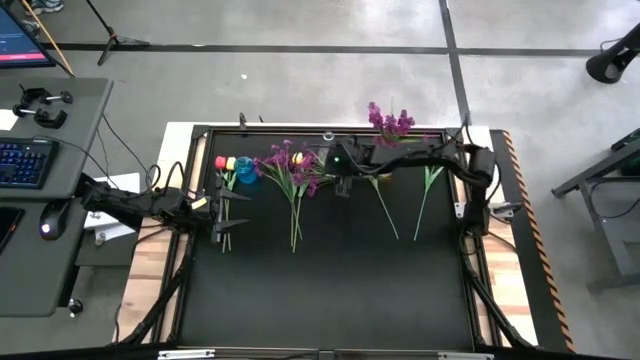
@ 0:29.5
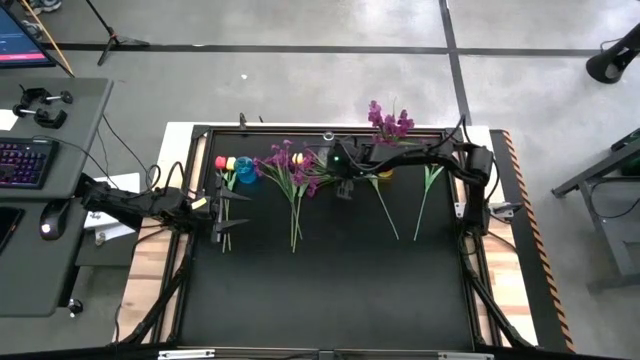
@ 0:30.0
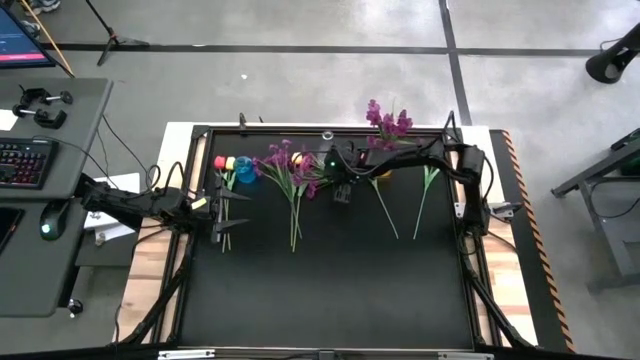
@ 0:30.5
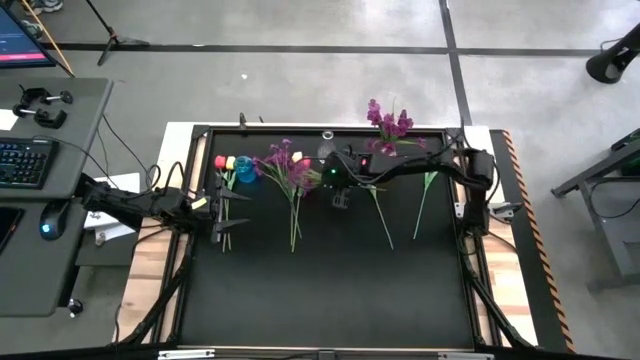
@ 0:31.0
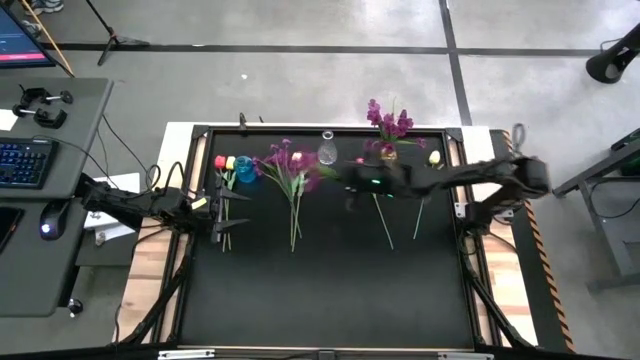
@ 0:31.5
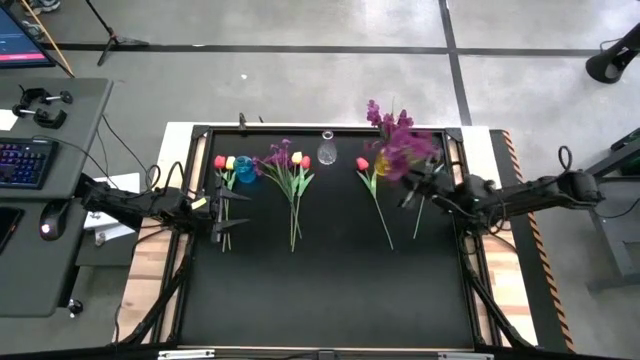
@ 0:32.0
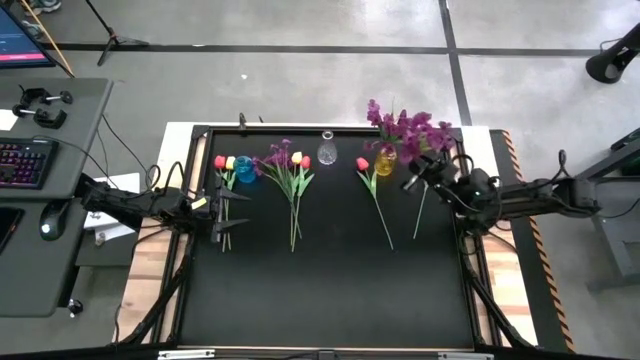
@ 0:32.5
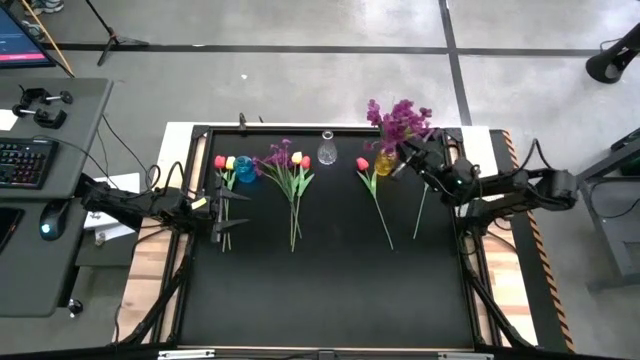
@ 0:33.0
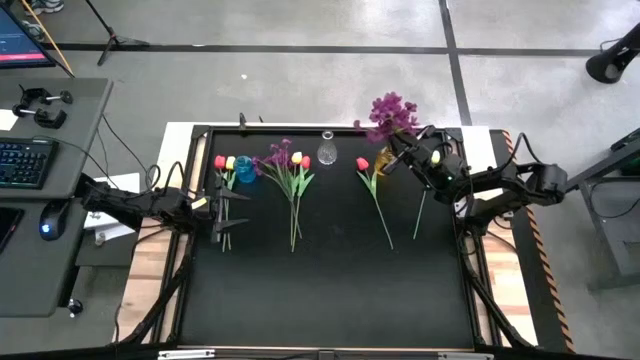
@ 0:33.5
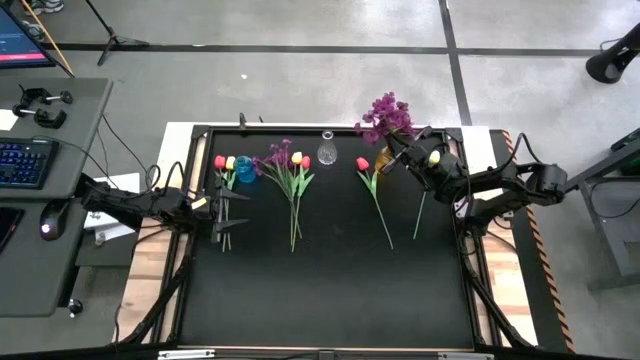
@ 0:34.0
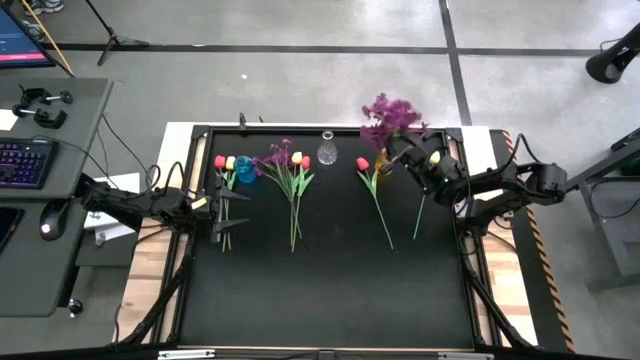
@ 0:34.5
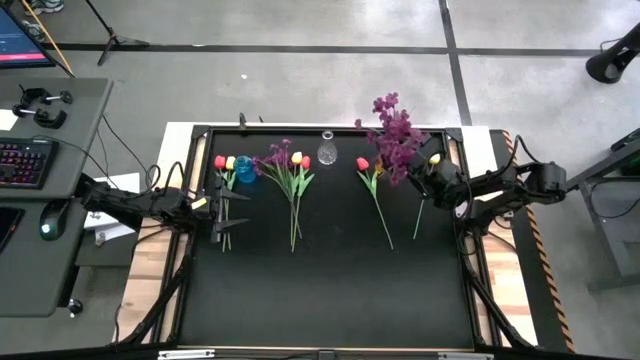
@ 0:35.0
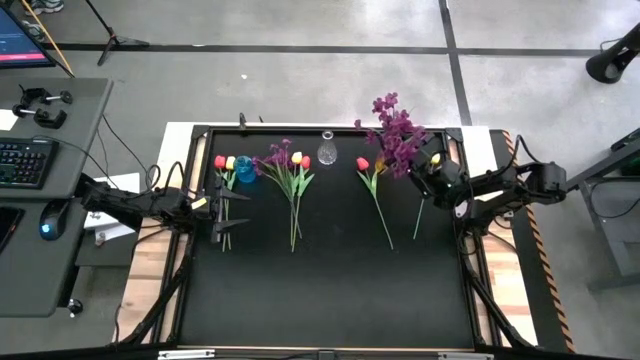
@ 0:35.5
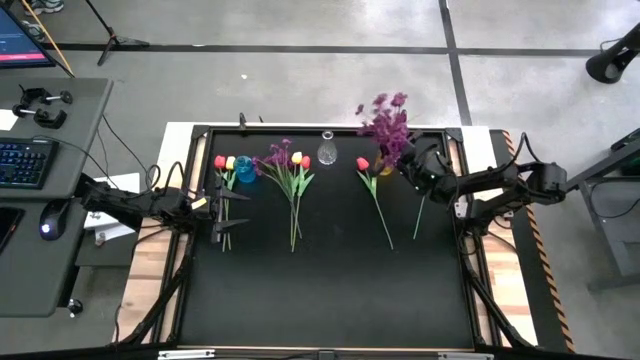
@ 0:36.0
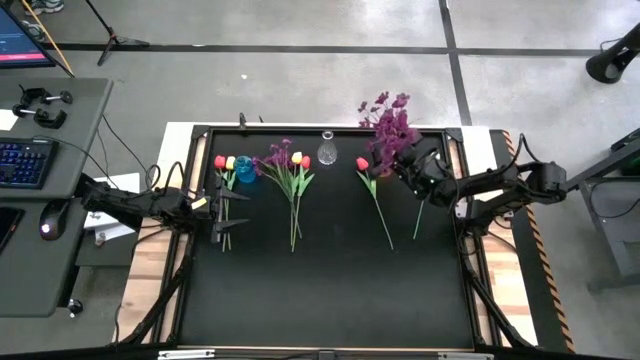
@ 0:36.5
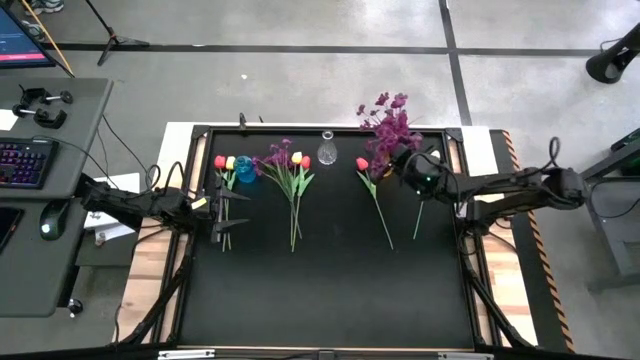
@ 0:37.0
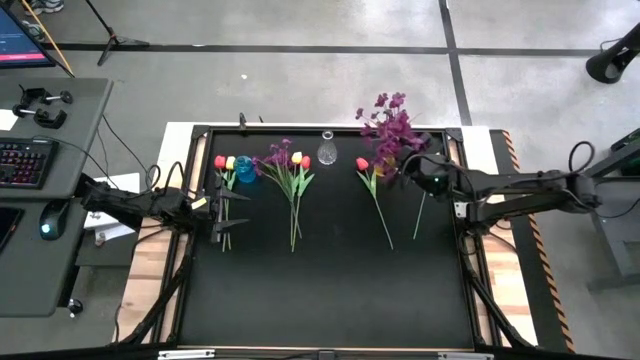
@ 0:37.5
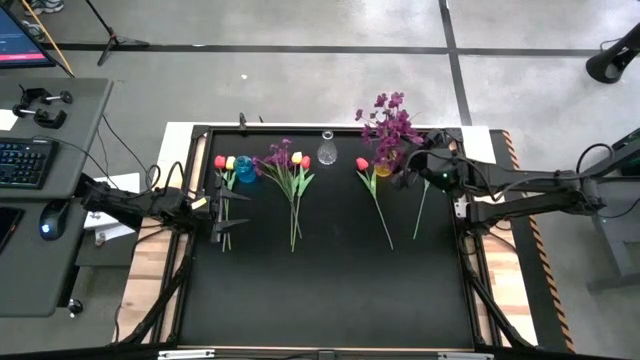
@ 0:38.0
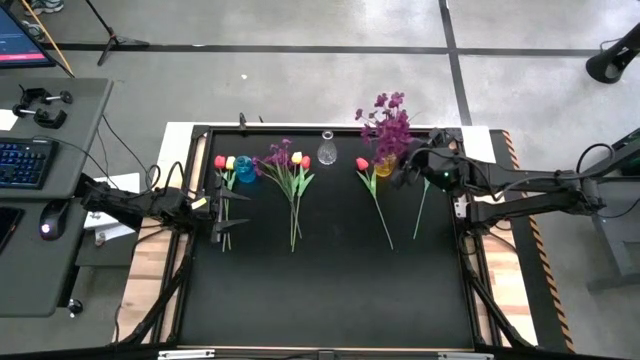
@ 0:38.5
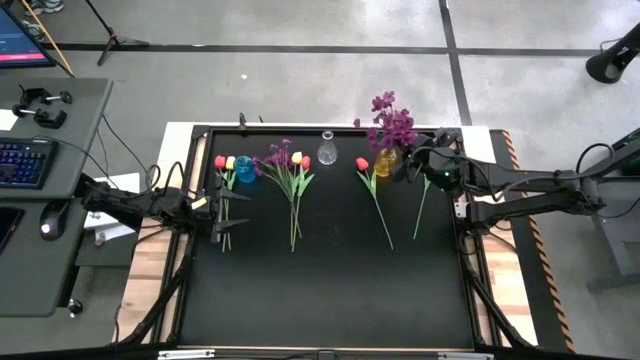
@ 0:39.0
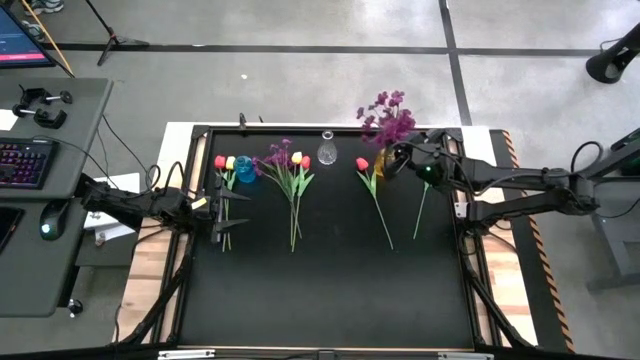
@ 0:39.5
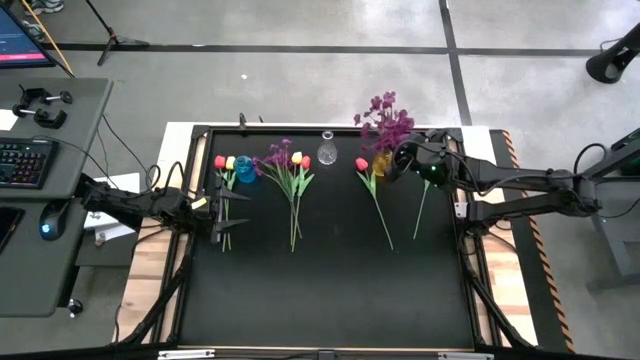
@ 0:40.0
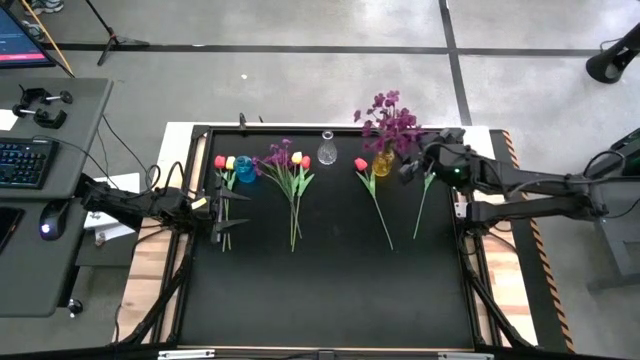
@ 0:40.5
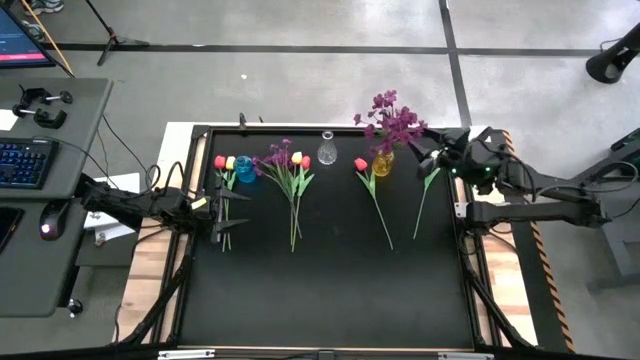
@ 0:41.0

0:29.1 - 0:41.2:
Task: Sort flowers into vase by color
Put the right purple flower into the yellow vase

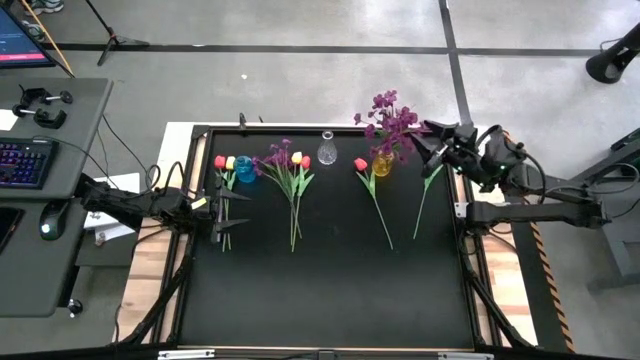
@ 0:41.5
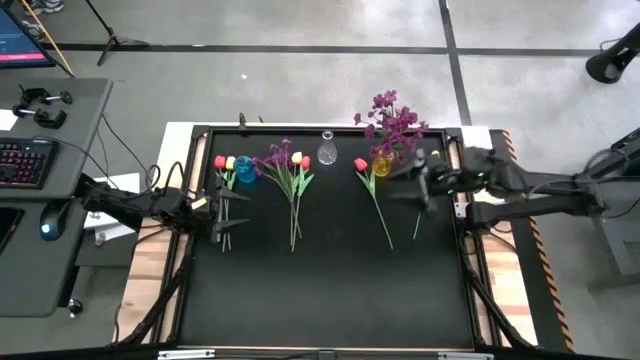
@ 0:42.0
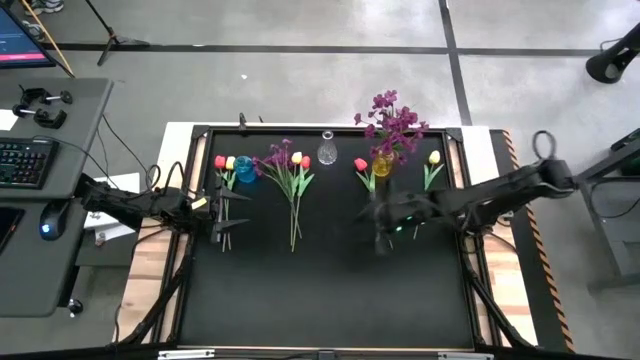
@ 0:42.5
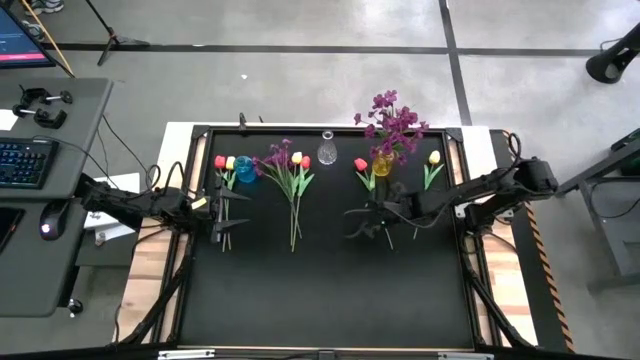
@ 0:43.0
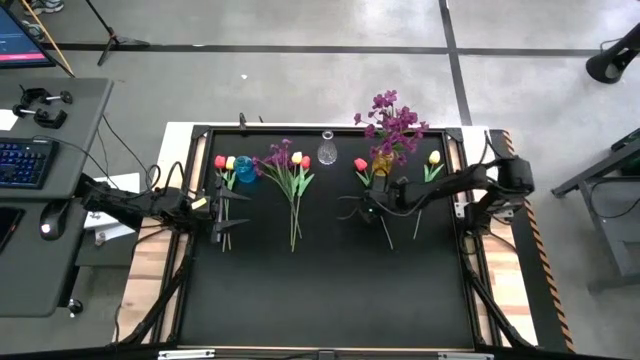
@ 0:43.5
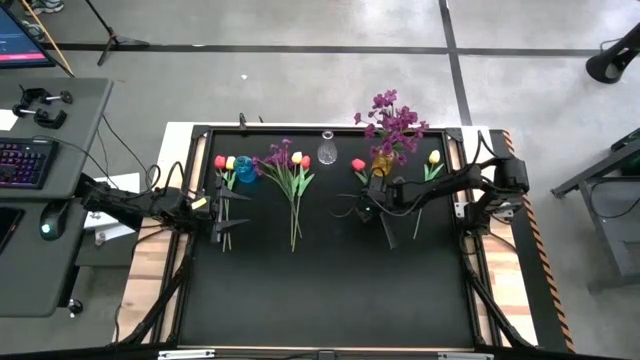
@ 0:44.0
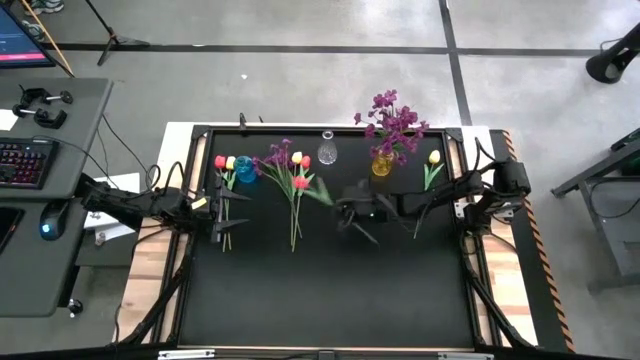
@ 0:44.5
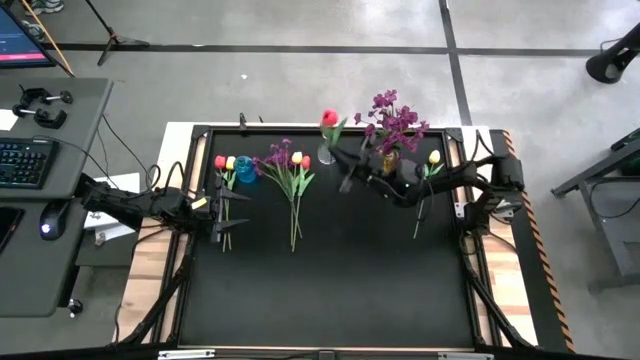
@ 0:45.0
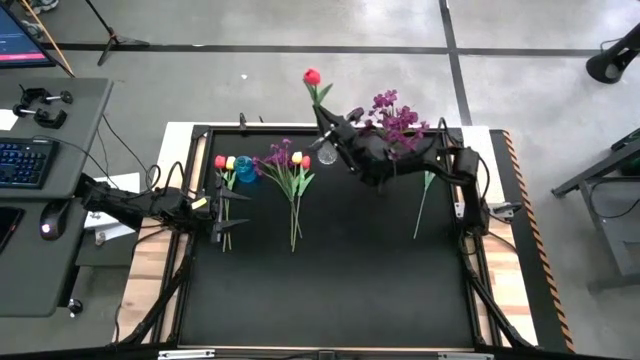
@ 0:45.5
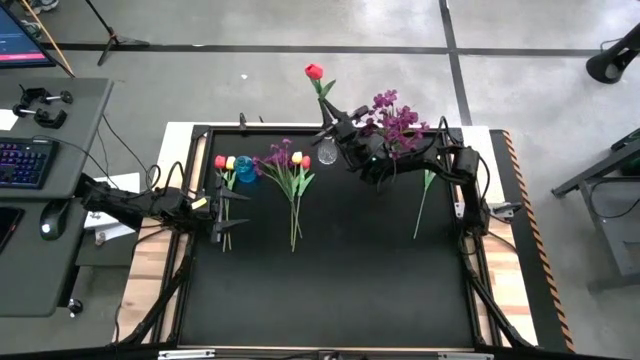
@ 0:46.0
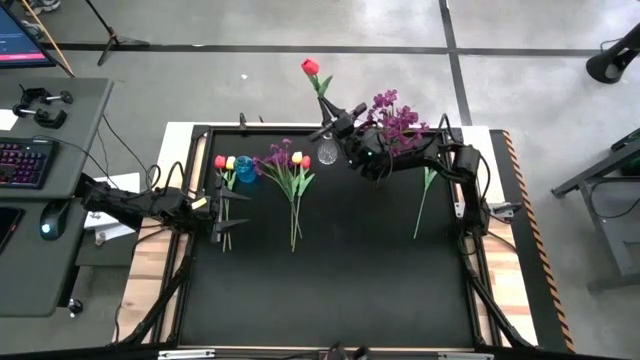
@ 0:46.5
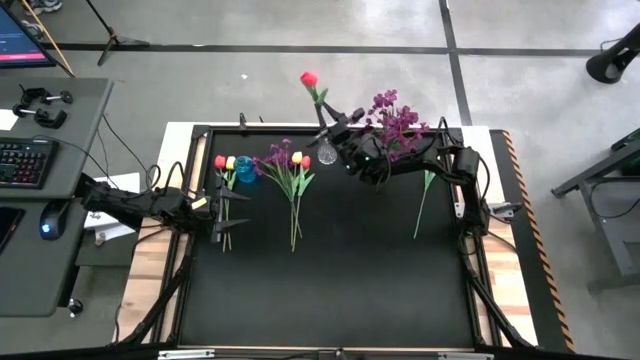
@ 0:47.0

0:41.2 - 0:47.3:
Put the right pink flower into the transparent vase

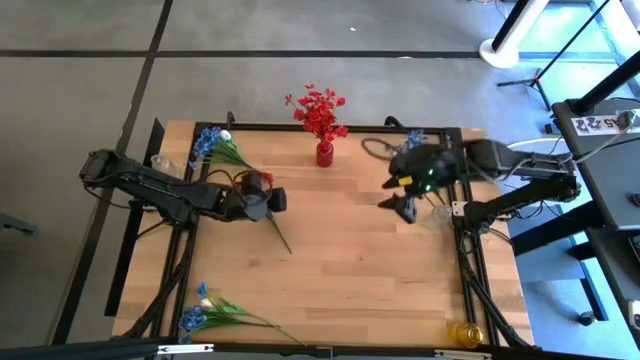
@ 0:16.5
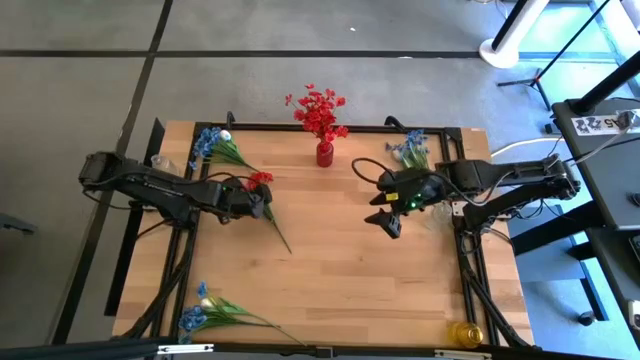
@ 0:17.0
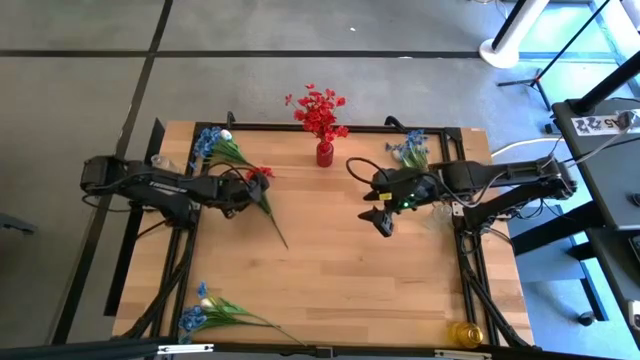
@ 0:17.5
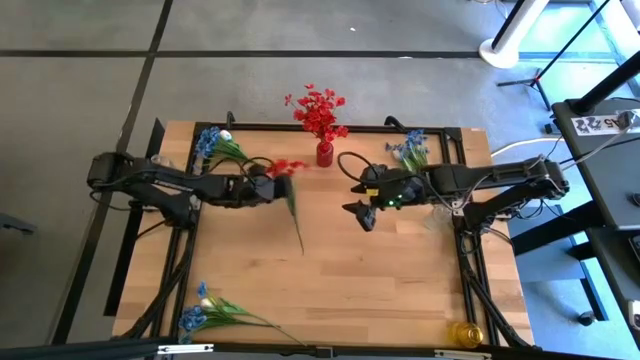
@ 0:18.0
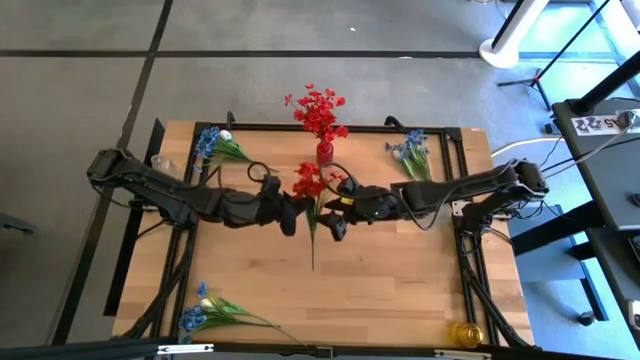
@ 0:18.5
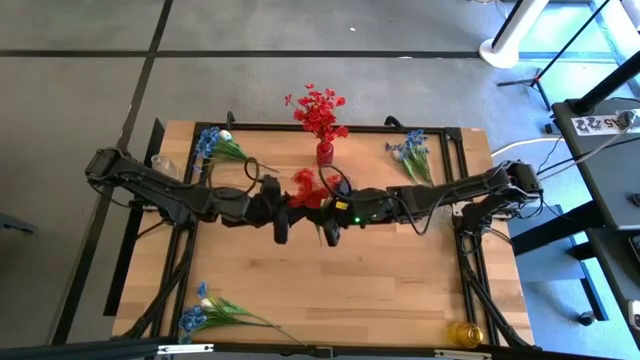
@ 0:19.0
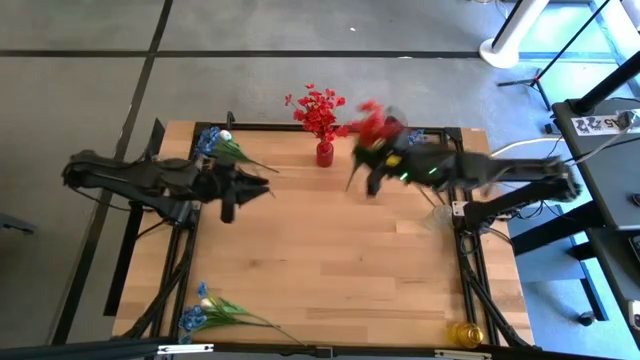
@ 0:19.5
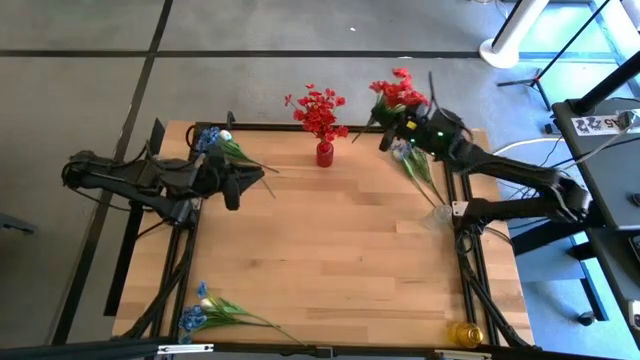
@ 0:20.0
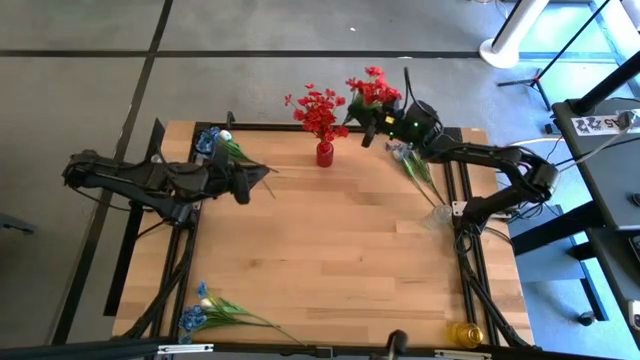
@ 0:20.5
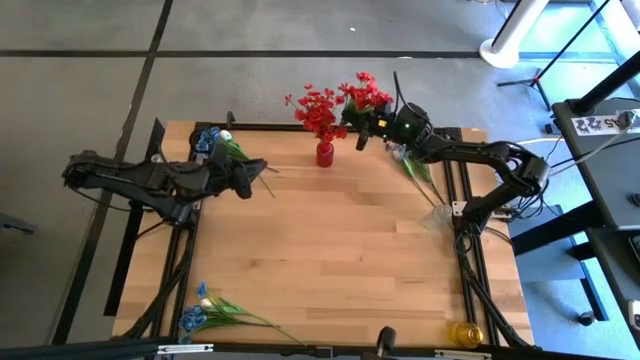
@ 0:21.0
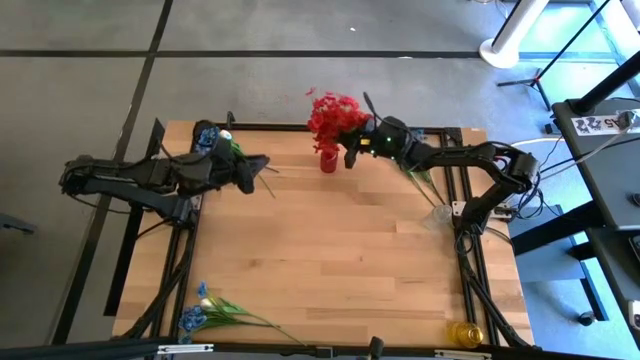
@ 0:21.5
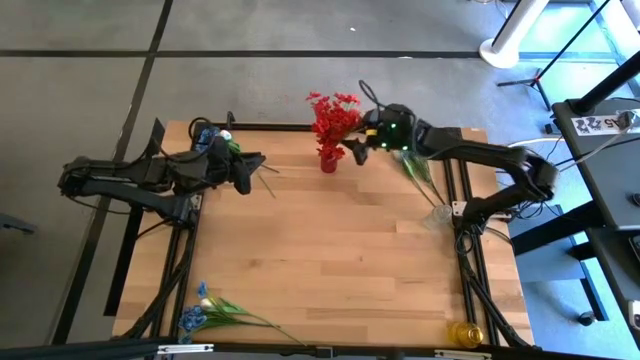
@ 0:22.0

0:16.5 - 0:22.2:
Task: Sort flowers into vase by color
Put the red flowers into the red vase
